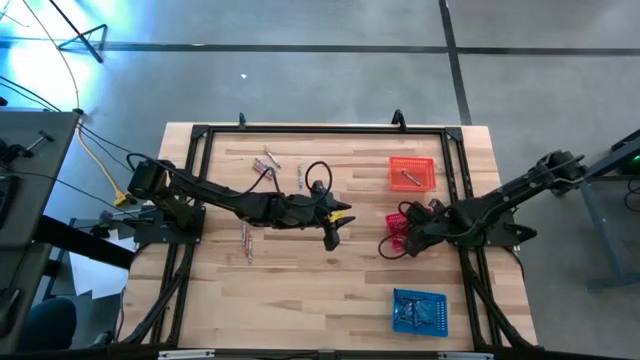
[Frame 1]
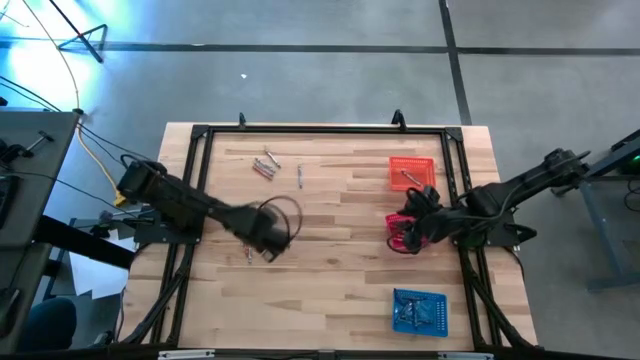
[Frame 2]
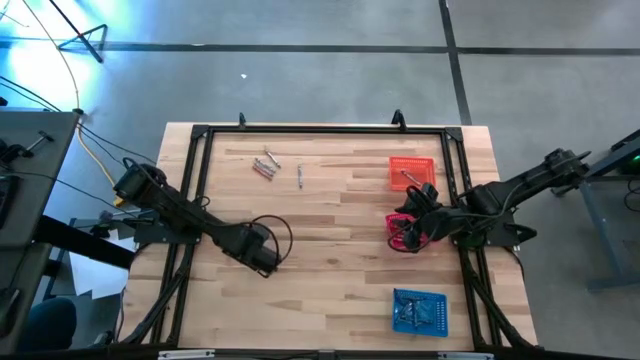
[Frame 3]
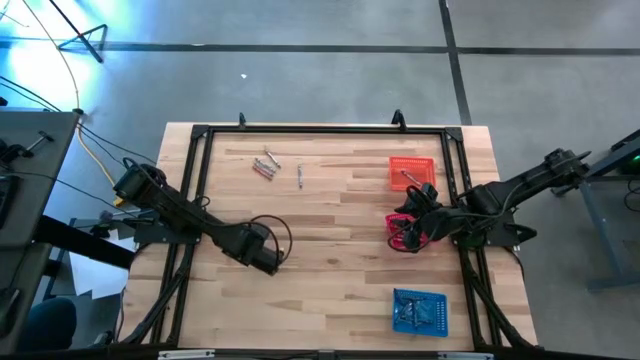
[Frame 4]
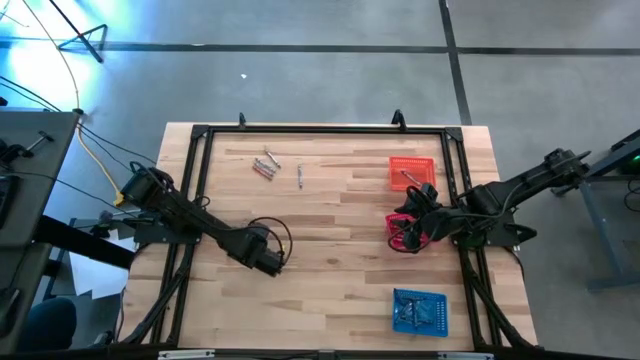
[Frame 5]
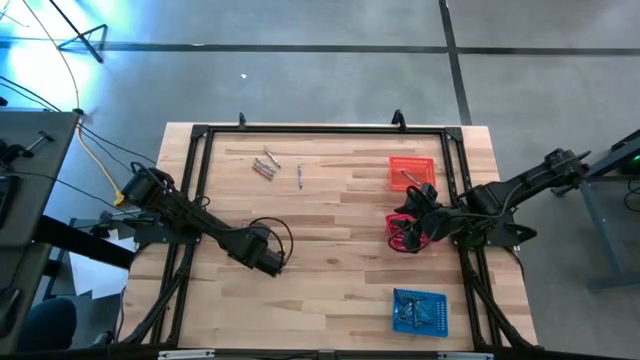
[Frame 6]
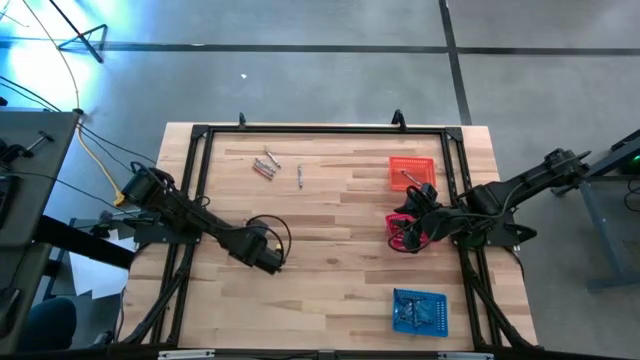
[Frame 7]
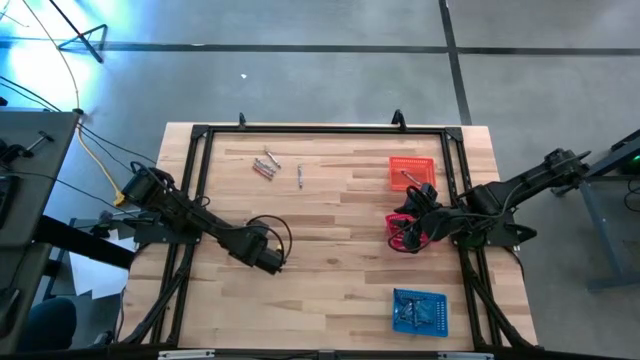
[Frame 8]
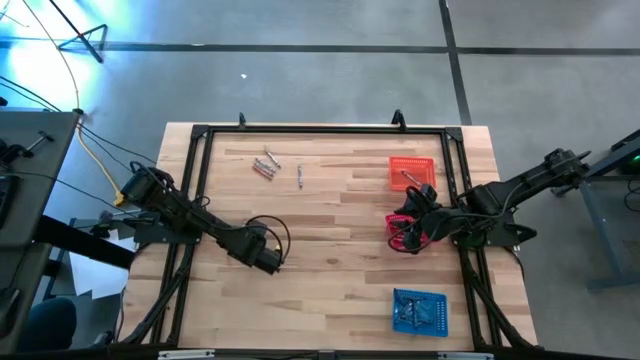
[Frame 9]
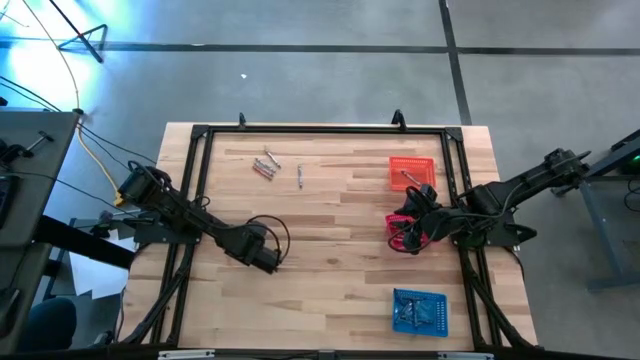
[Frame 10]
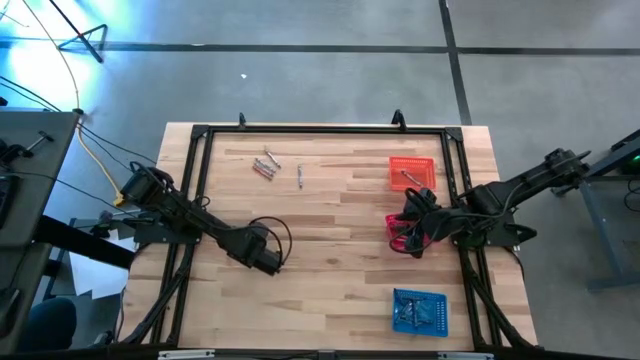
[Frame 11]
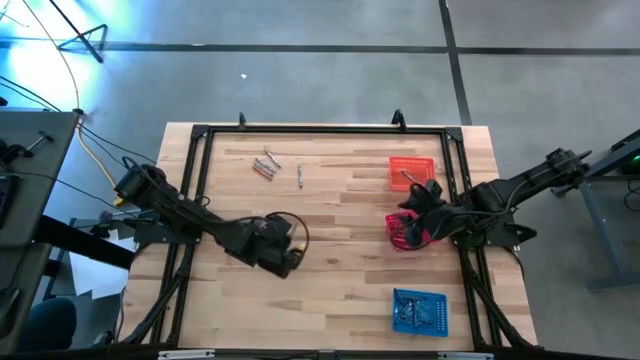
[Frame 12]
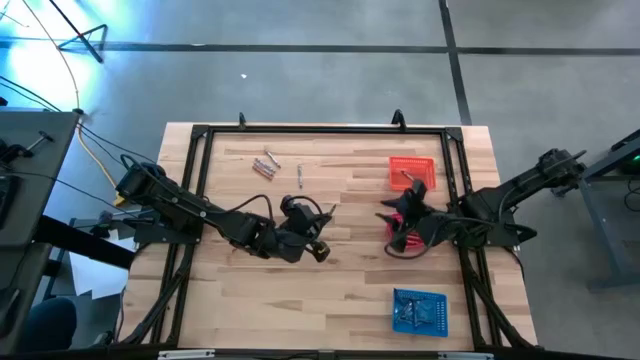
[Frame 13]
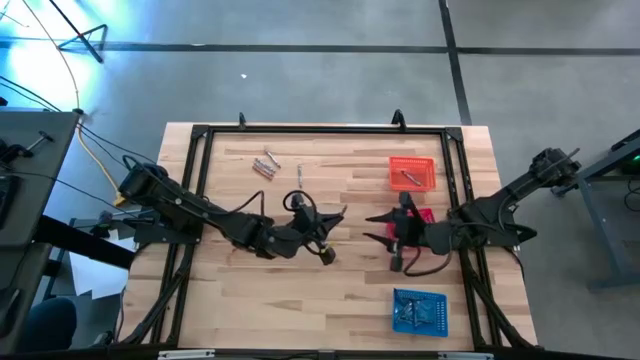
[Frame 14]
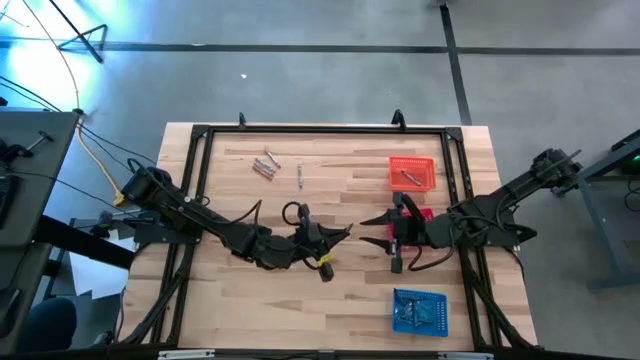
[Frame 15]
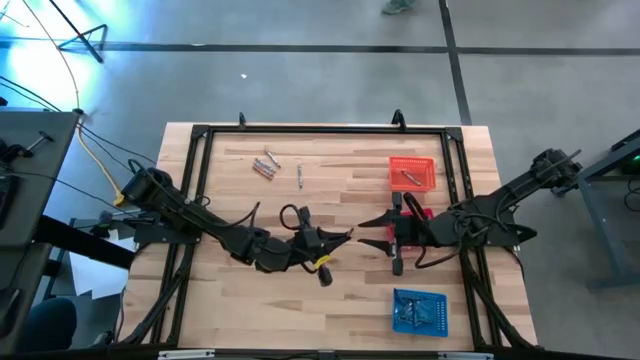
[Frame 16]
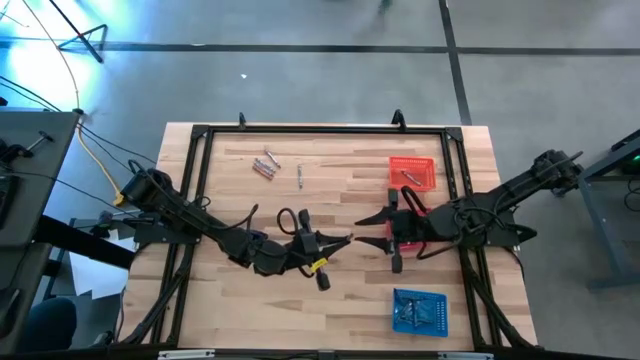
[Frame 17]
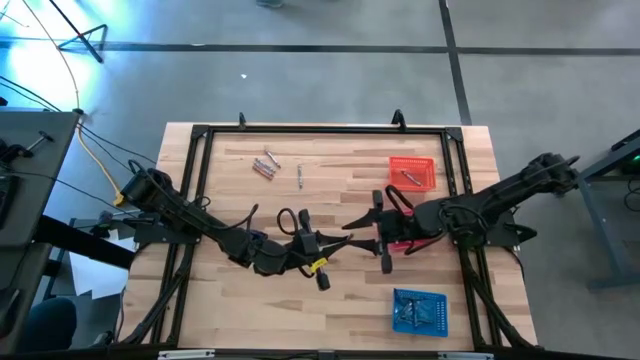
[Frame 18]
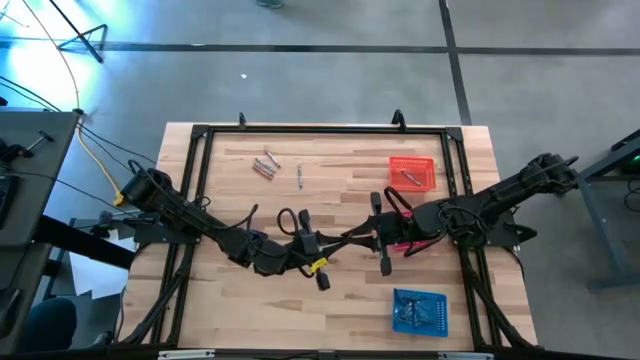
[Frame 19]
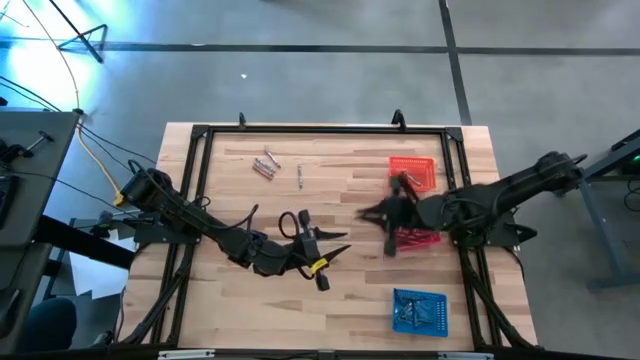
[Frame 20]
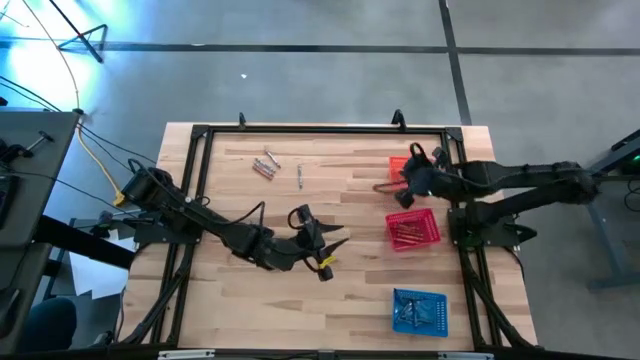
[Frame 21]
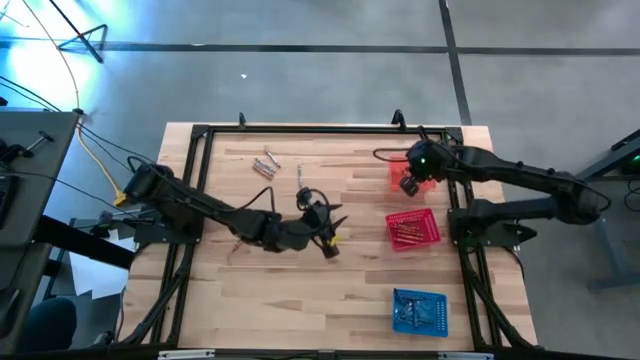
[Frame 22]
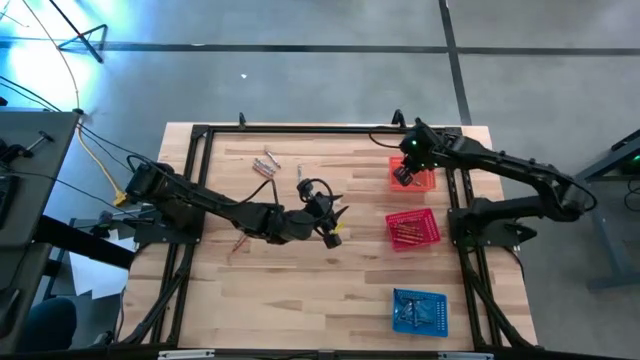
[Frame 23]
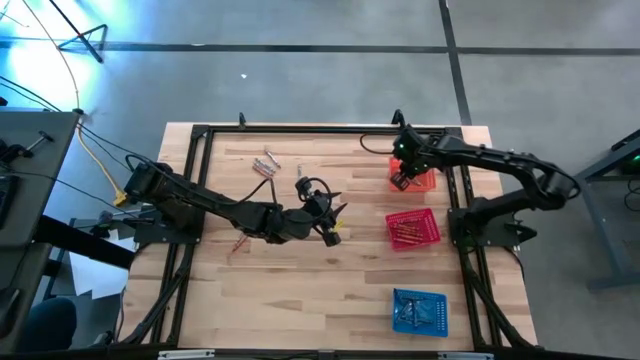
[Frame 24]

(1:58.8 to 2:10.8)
Task: Sort crayons
Put the gray crayon into the orange bin

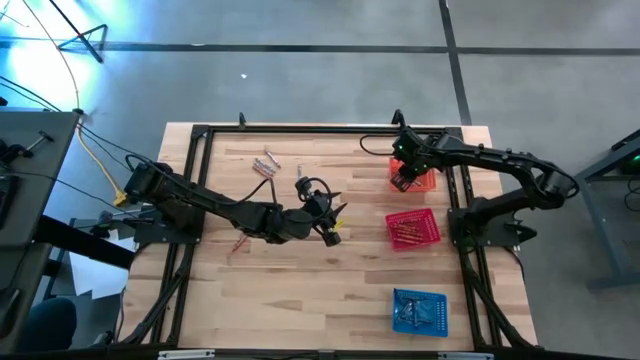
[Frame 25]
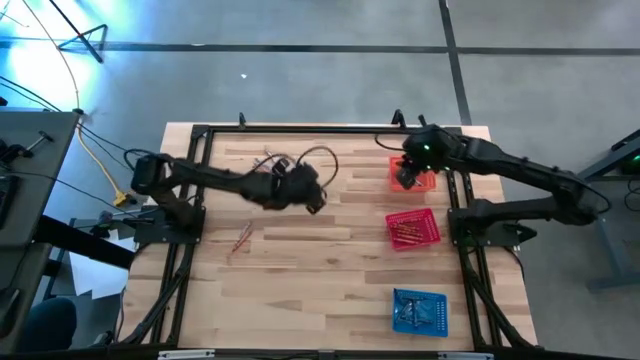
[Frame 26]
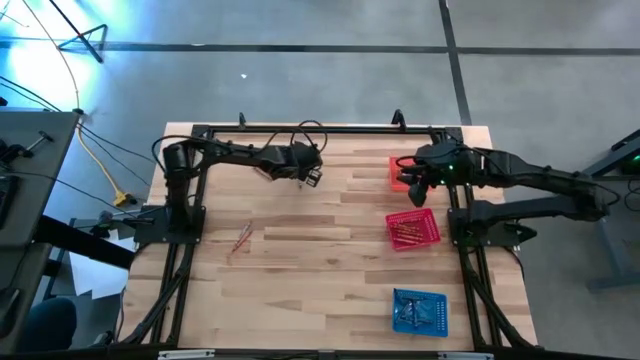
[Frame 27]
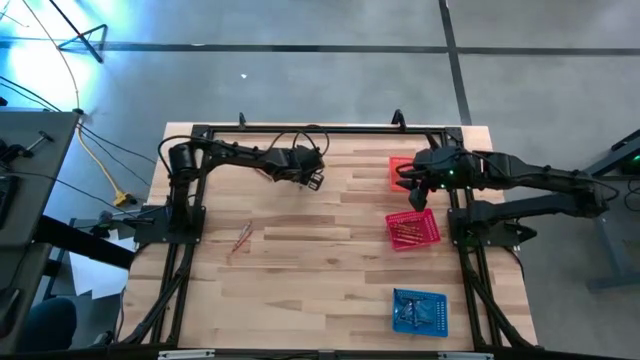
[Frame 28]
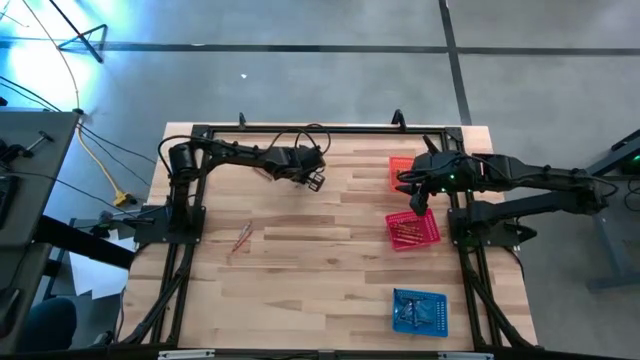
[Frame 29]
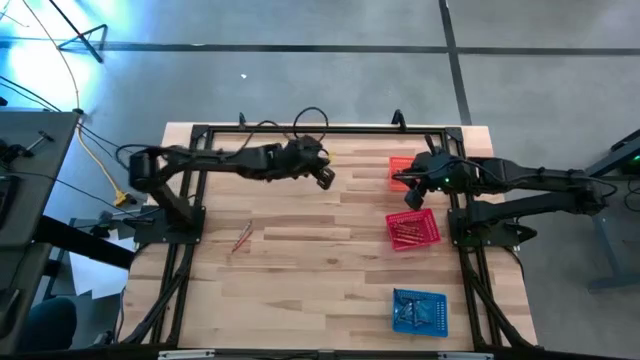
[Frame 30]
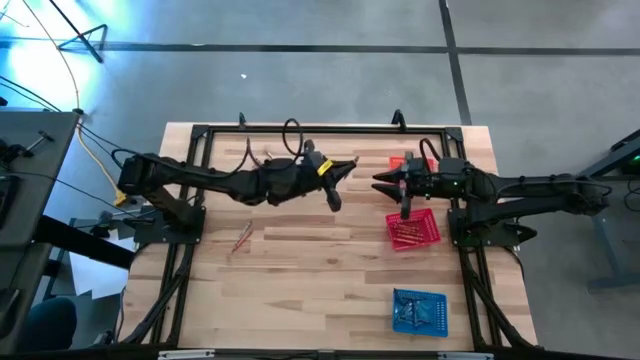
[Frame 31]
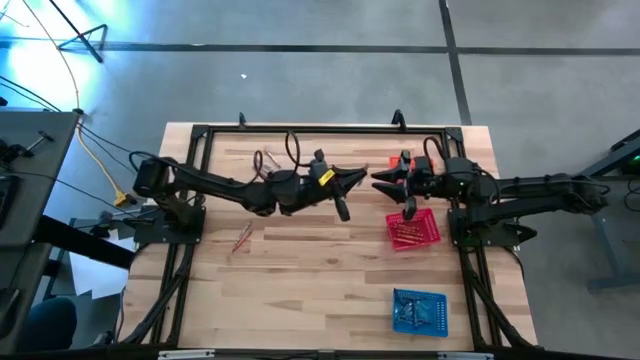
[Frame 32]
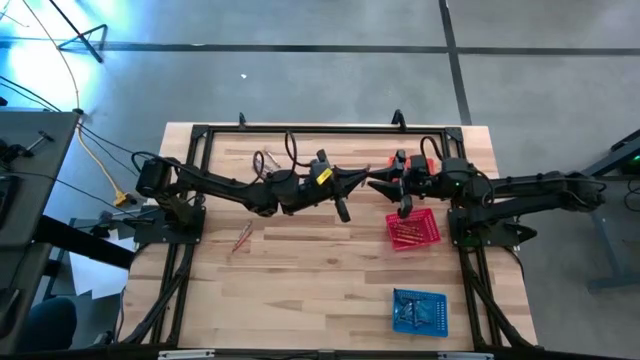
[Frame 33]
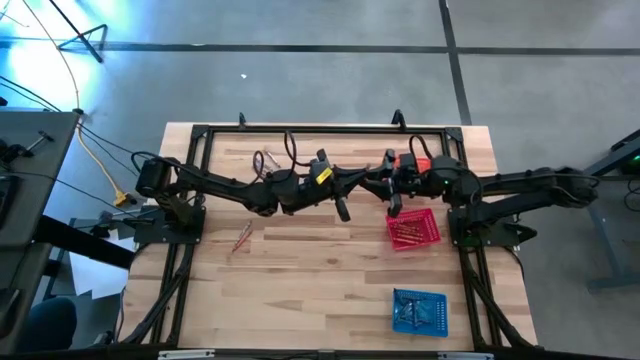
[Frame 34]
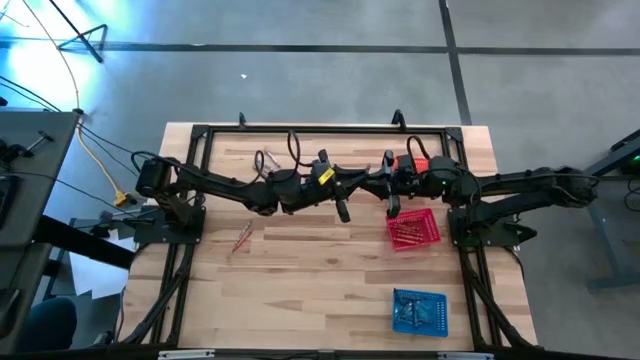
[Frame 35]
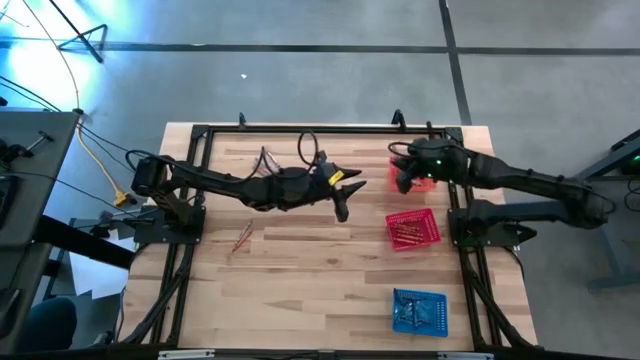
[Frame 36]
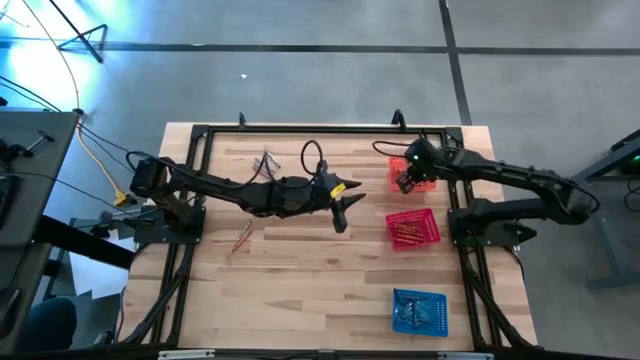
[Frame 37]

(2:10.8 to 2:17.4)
Put the gray crayon into the orange bin

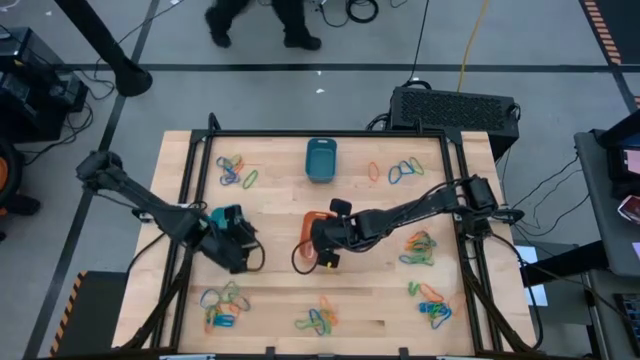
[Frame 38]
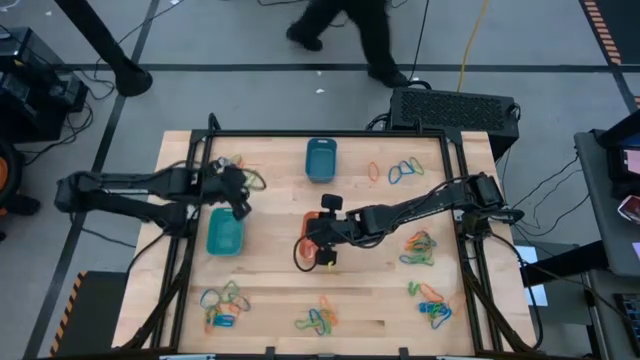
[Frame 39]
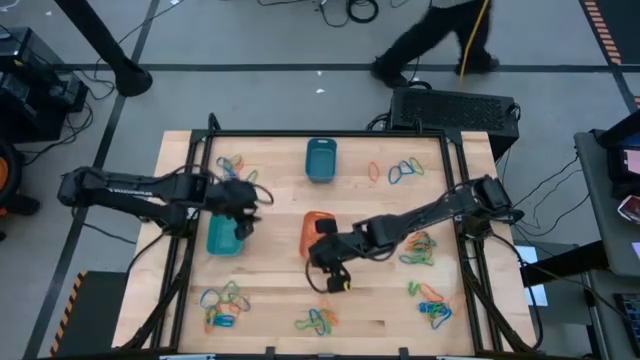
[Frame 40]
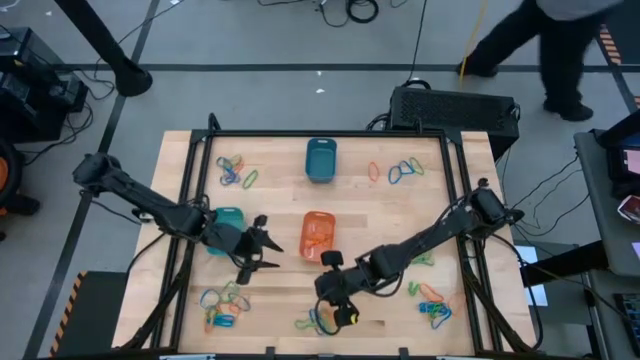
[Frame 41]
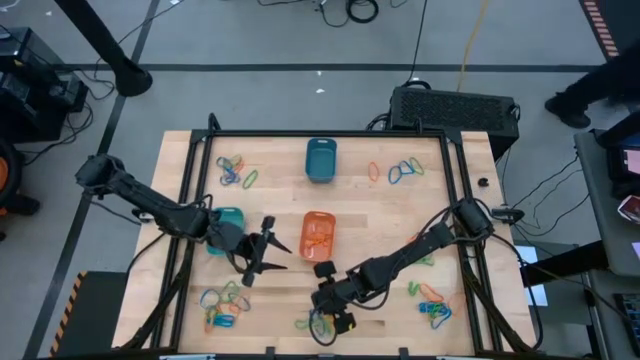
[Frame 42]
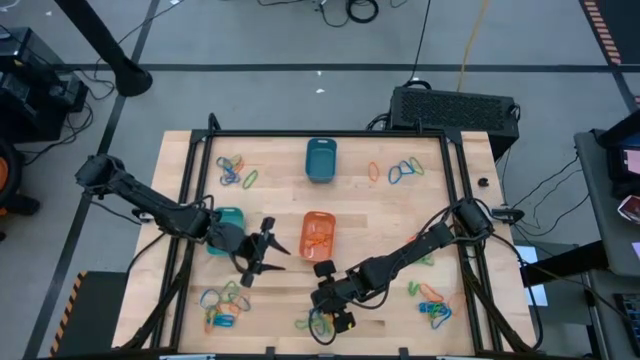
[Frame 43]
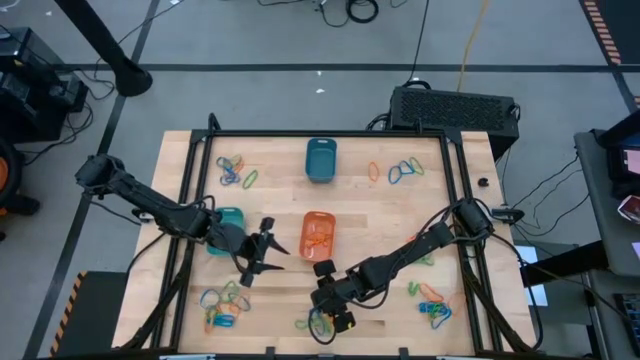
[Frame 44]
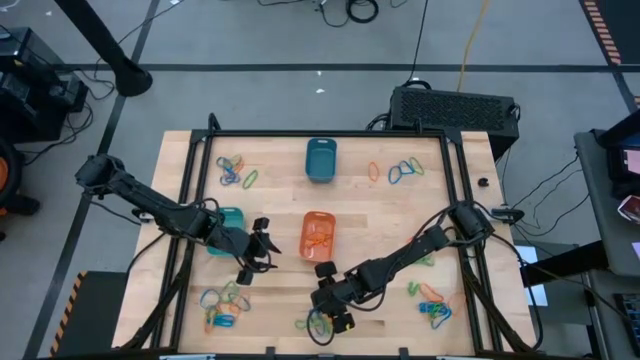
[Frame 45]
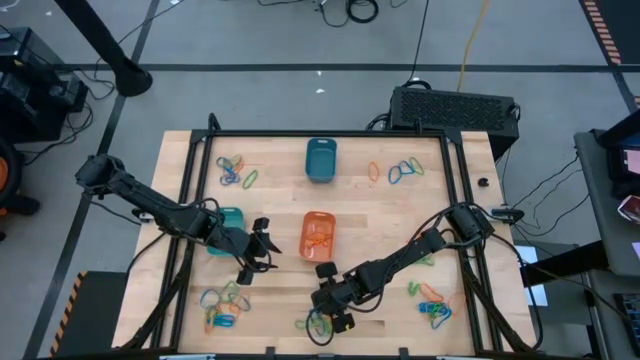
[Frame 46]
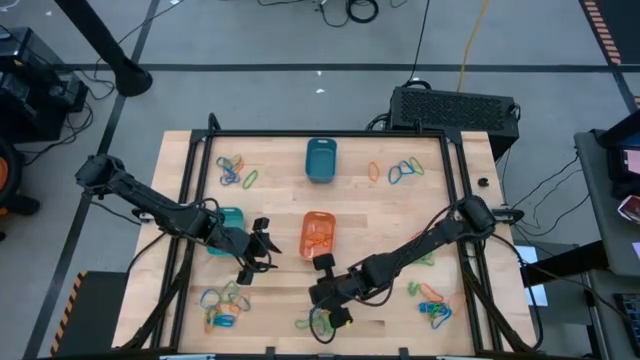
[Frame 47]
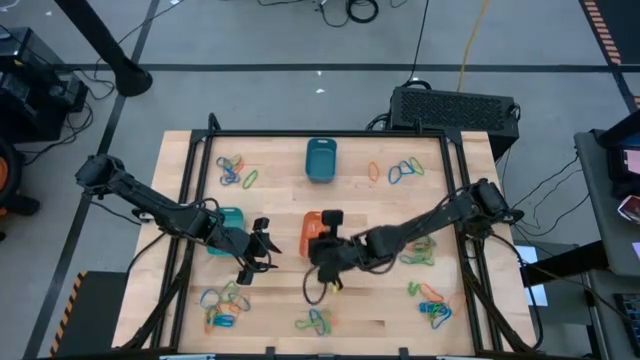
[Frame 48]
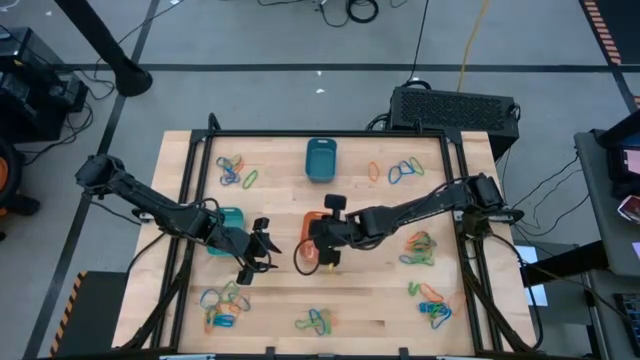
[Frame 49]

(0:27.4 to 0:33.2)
Task: Sort rubber bands into baskets
Put the orange rubber band into the orange bin
